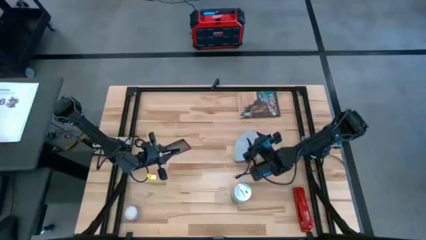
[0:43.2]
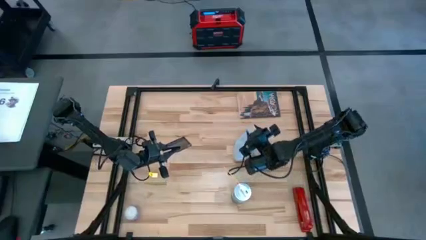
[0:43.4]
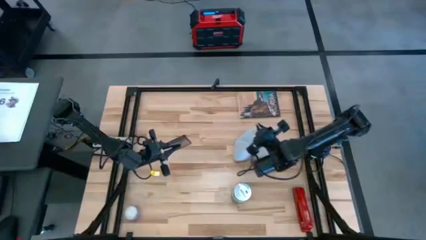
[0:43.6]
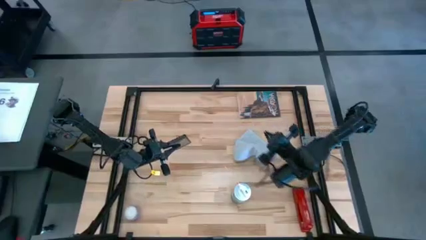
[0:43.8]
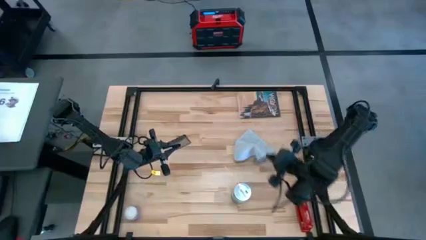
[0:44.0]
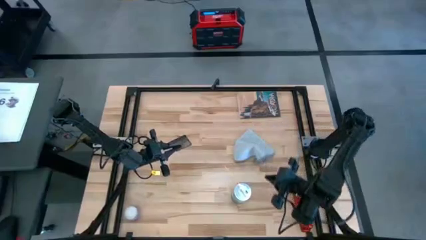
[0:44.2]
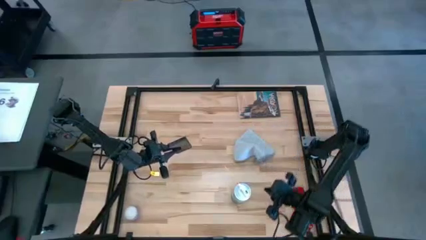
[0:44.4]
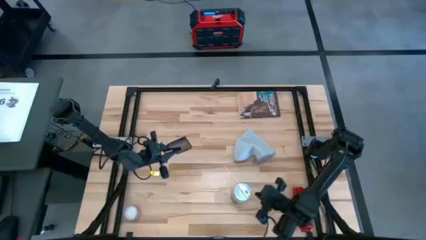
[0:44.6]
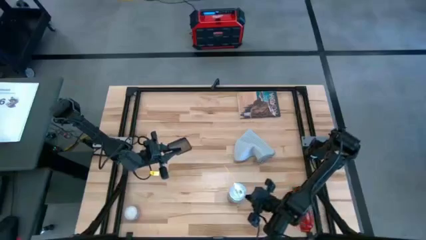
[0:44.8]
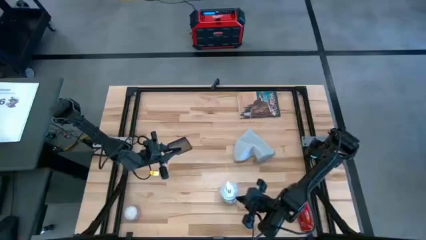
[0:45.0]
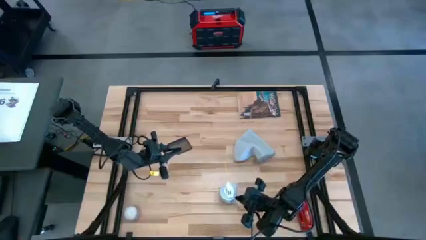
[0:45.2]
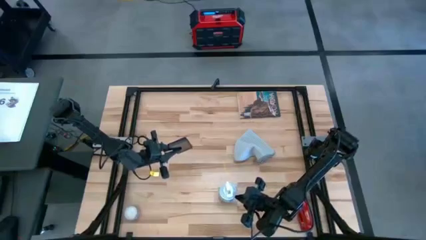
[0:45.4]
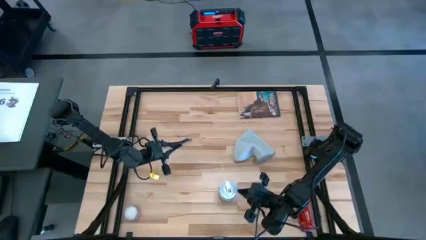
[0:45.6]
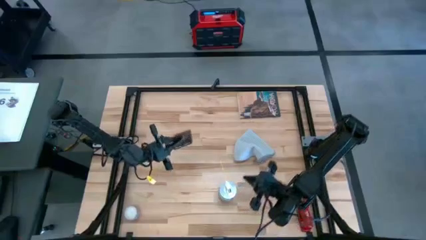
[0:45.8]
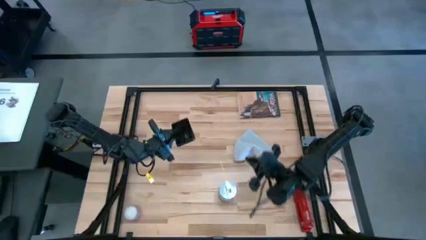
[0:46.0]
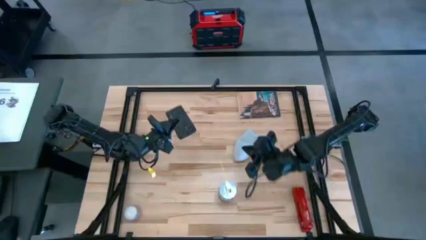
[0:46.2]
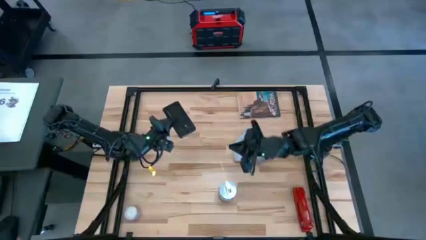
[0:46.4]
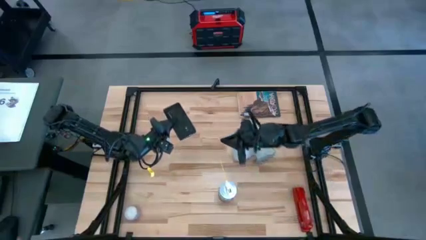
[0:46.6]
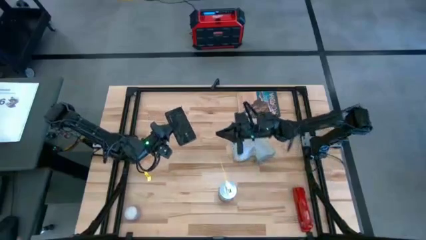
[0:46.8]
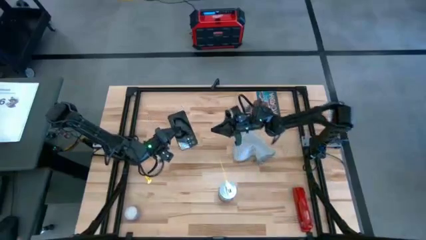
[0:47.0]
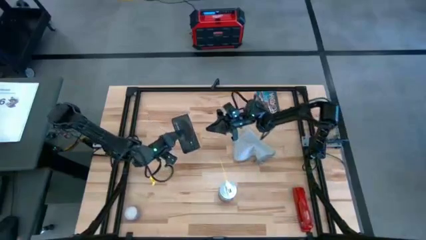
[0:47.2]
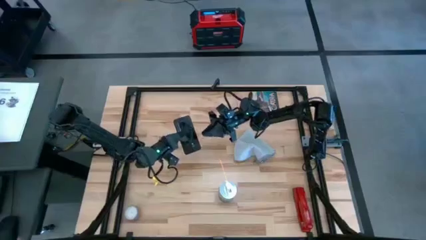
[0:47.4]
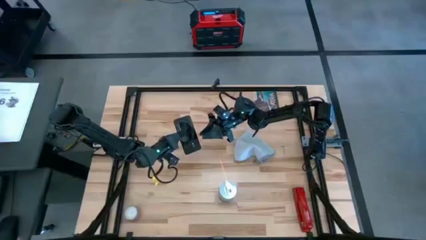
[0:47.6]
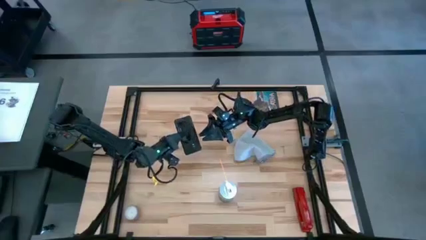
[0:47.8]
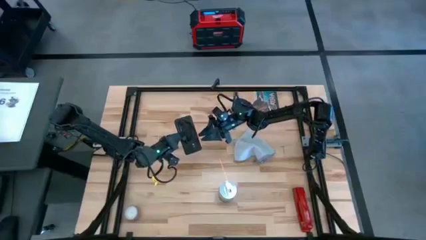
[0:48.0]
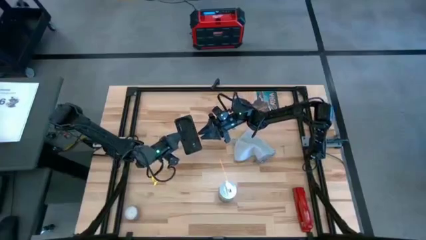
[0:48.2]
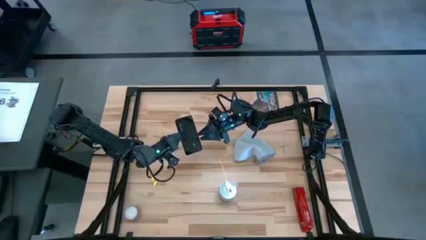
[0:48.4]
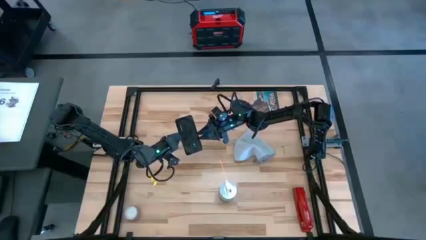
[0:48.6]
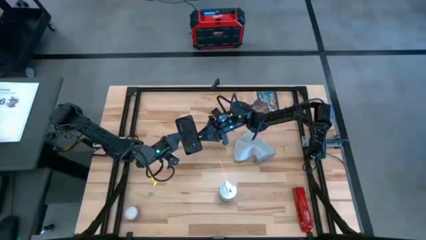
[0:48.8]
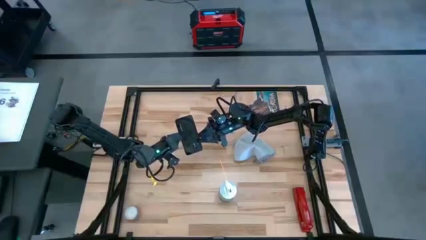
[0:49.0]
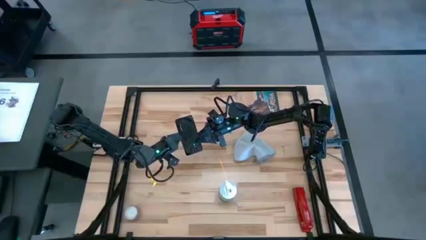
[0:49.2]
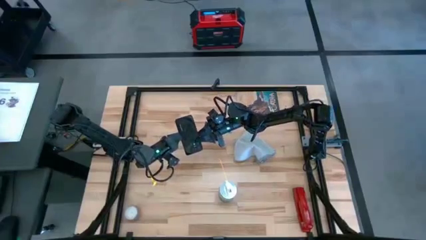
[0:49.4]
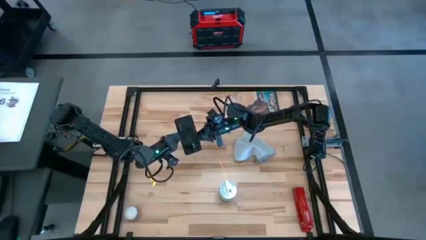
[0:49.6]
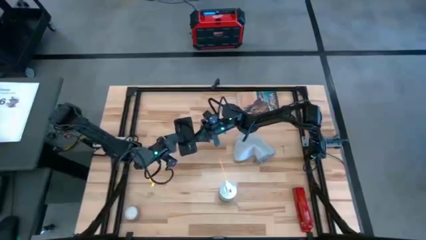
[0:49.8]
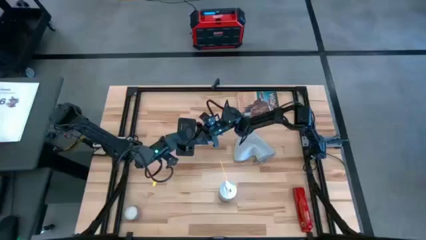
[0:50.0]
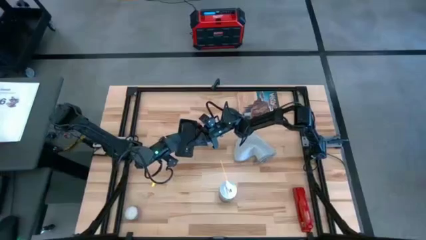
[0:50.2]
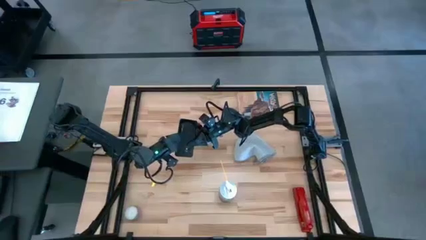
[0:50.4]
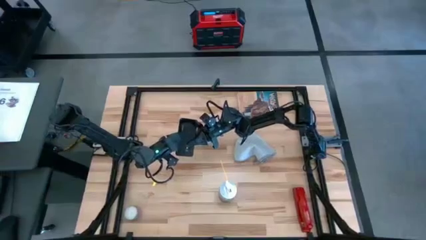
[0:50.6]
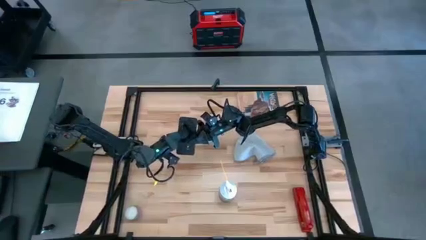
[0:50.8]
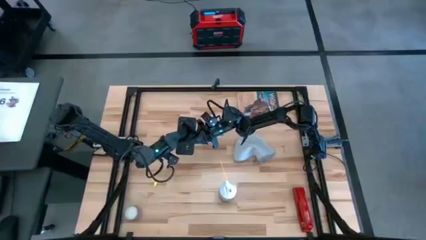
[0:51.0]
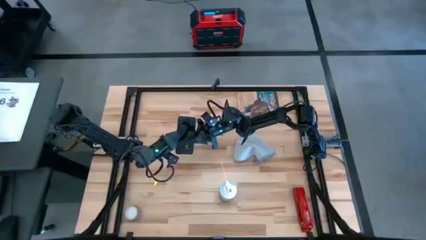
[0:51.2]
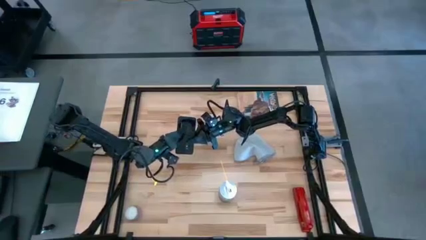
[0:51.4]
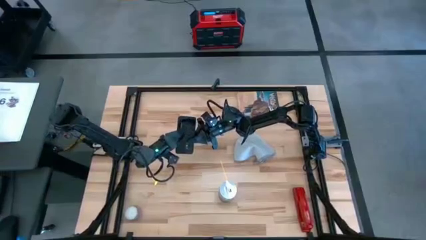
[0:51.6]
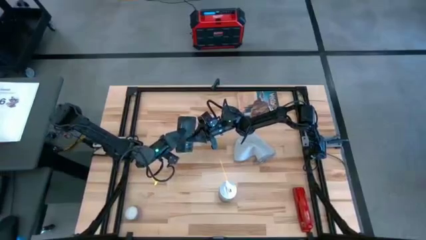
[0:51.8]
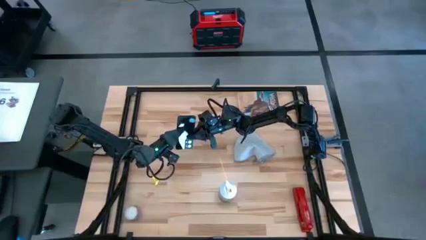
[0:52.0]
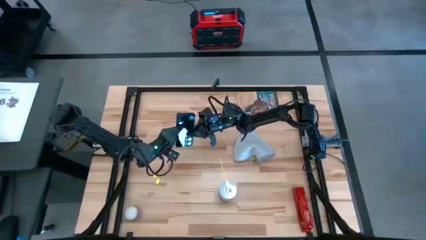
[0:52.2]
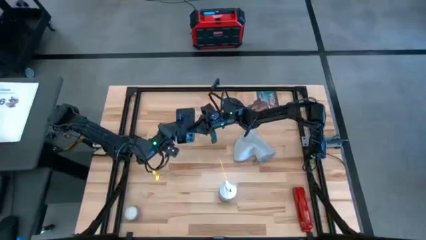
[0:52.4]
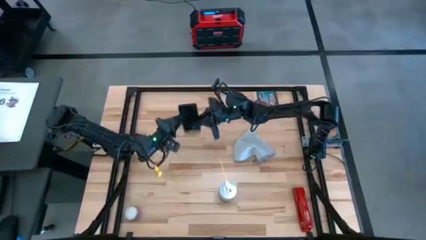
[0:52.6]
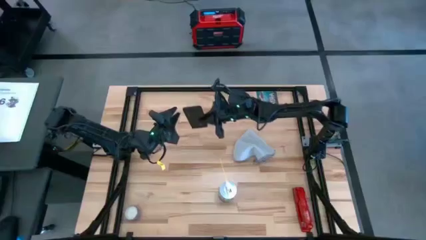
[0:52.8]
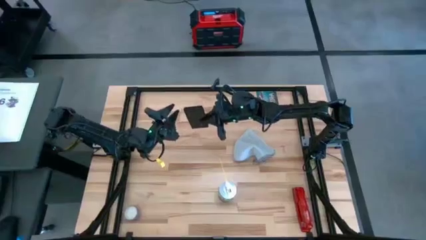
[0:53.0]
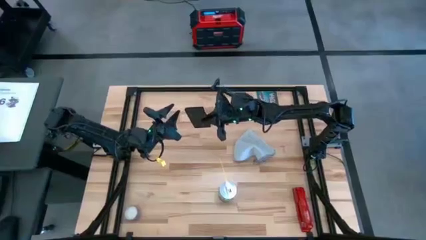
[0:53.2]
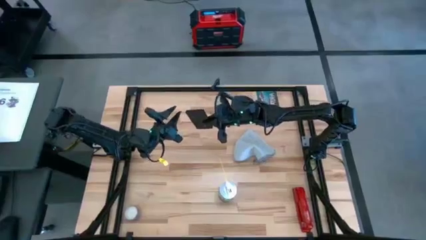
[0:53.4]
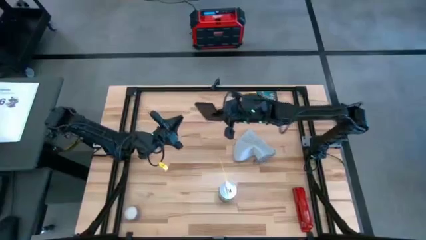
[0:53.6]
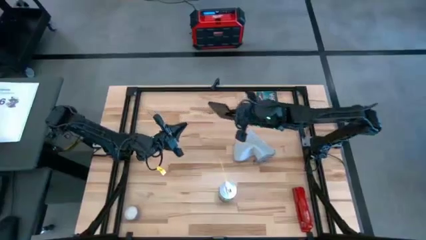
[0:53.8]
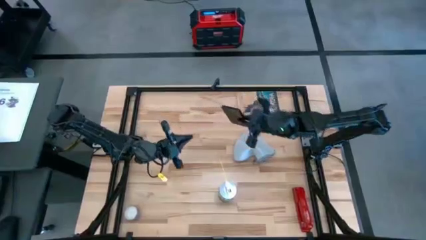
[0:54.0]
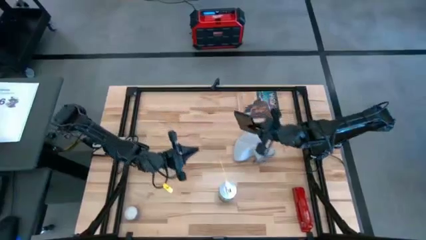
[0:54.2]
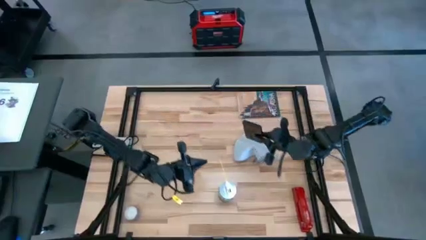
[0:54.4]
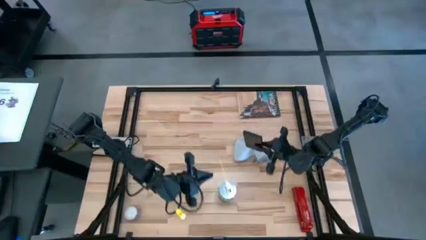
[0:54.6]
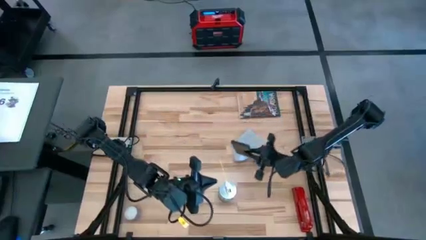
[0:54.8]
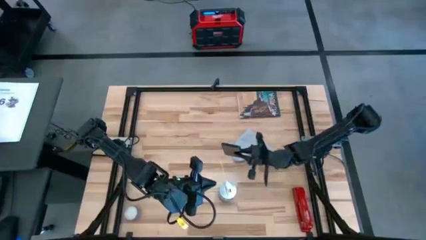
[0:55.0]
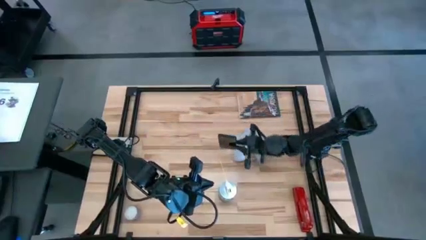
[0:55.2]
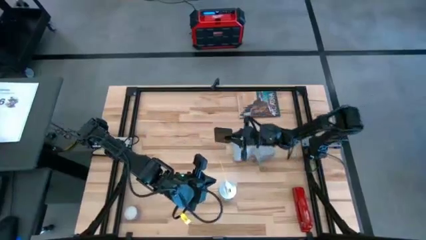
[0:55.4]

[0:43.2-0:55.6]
Task: Apply microfiber cloth
Spray the back of the black cellphone using the white spray bottle

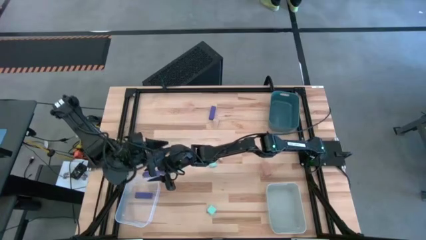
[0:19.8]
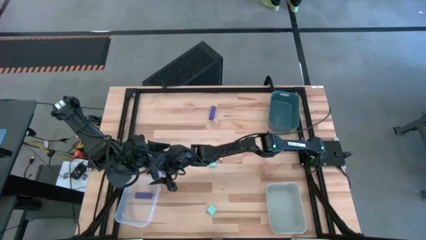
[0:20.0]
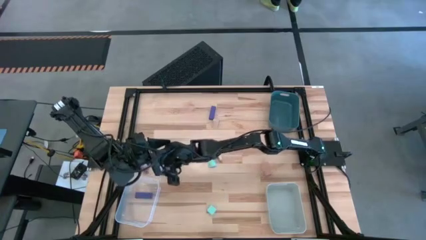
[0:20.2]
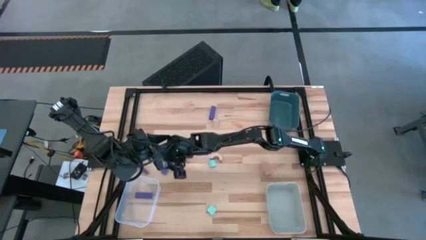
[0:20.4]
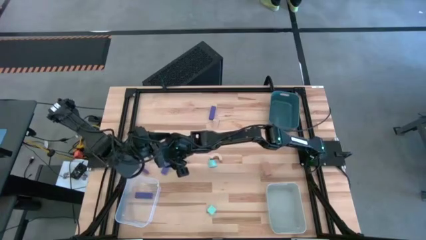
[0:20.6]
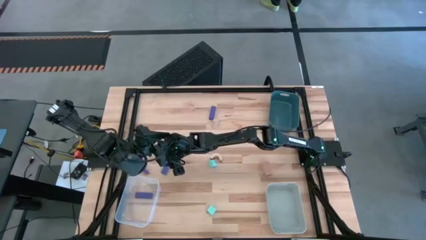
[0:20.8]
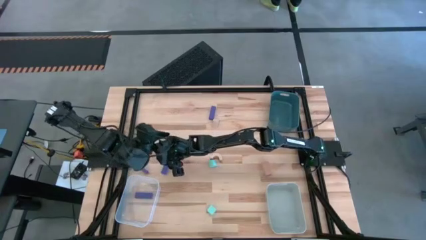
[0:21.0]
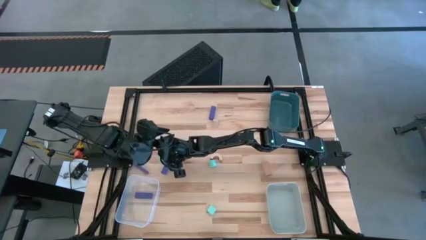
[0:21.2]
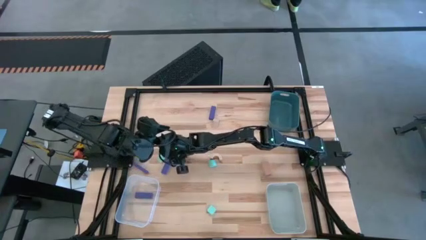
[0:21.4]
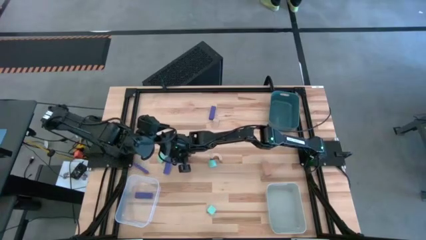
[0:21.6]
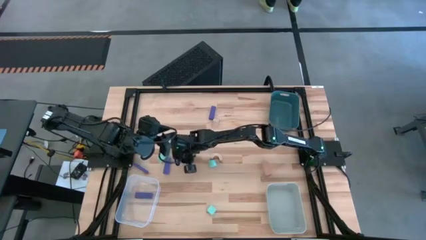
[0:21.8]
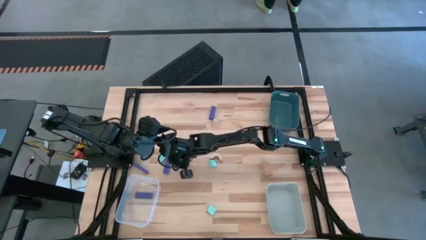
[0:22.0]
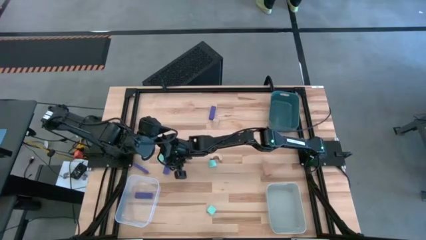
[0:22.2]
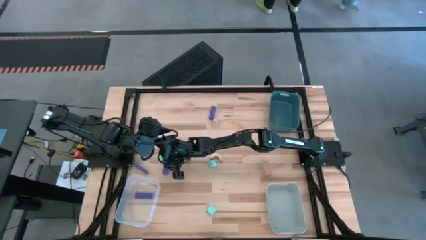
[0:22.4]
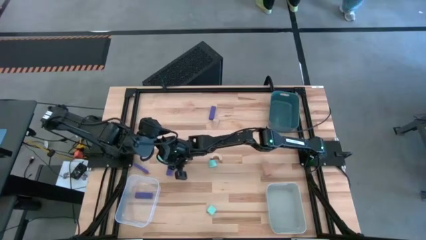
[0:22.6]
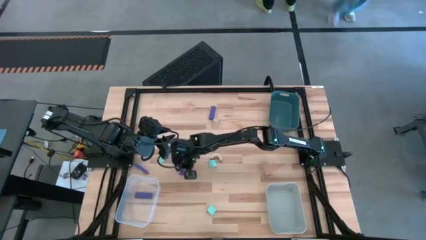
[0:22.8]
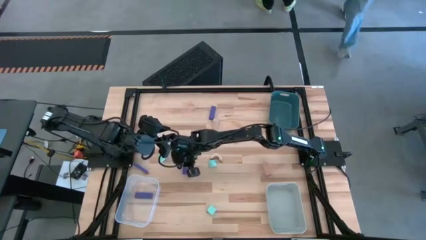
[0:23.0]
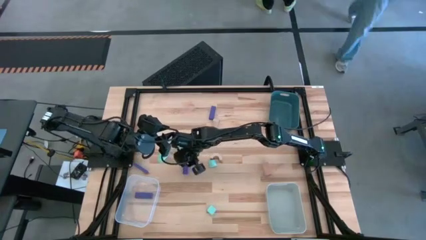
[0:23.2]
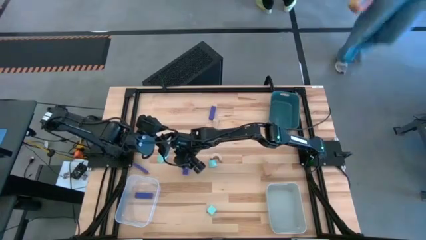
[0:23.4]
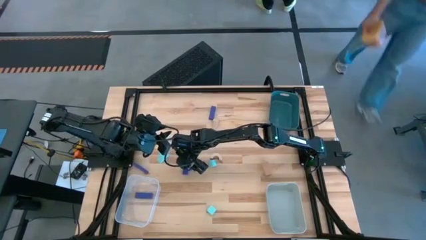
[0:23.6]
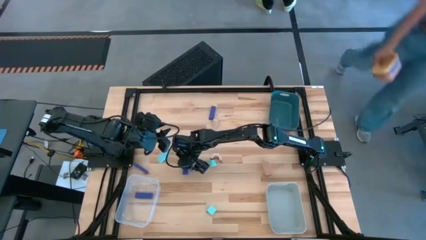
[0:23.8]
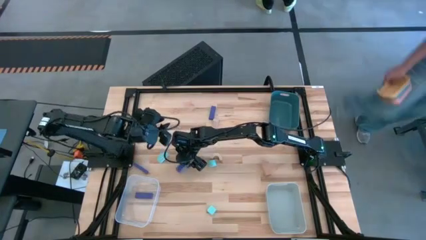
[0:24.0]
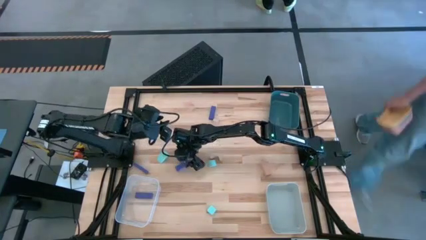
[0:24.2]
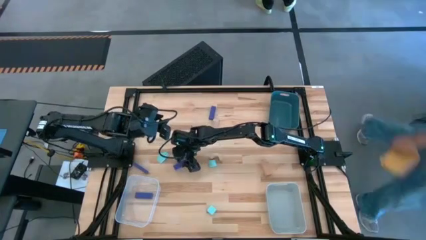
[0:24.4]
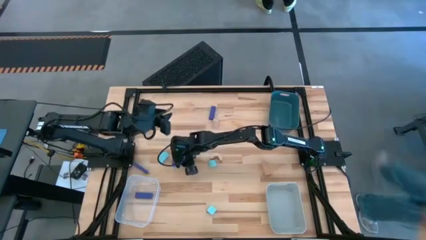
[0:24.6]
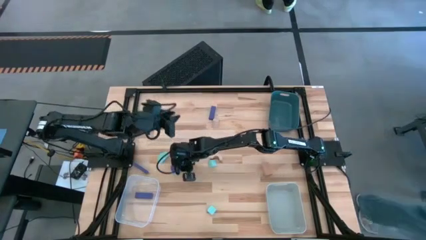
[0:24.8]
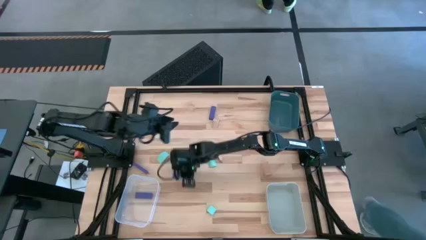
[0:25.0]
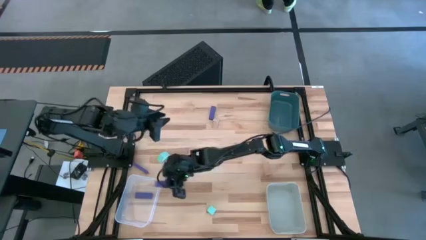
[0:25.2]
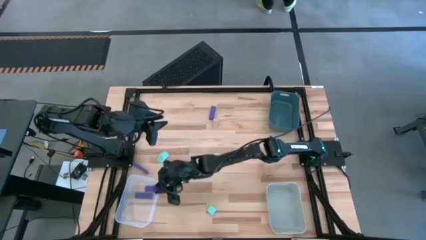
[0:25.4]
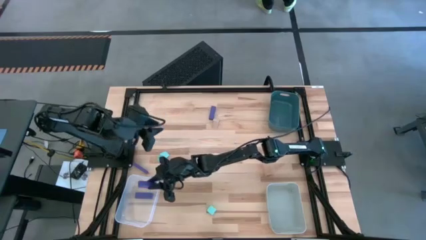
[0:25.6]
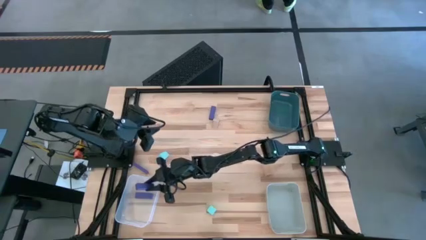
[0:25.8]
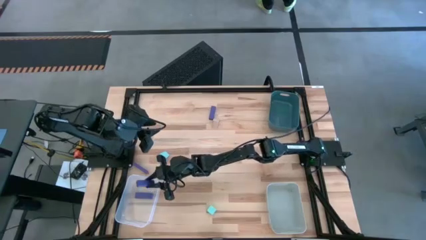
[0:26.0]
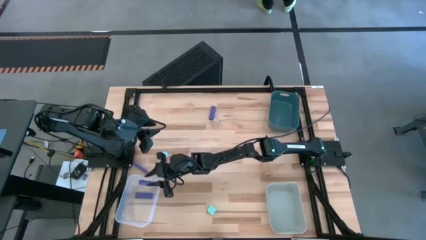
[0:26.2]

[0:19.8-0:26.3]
Task: Sort & place blocks by color
Put the bottom purple block into the transparent bin
